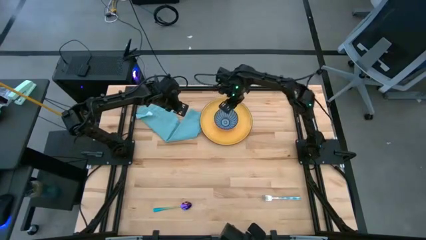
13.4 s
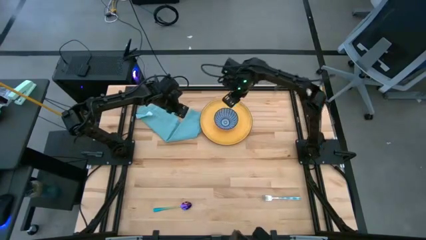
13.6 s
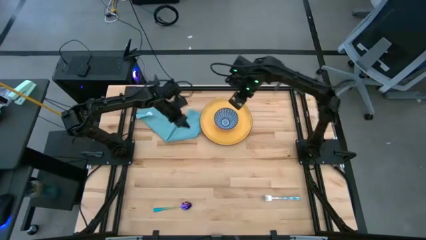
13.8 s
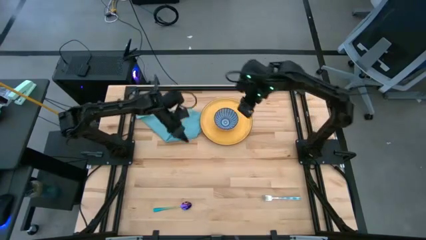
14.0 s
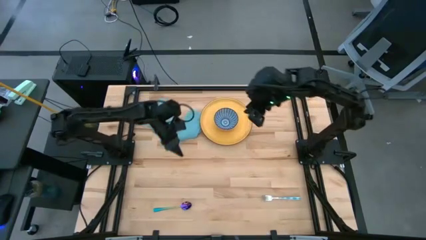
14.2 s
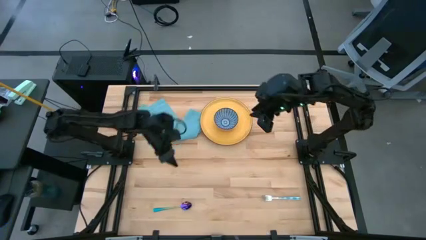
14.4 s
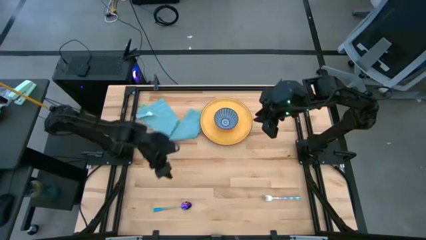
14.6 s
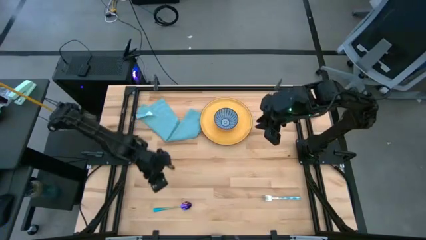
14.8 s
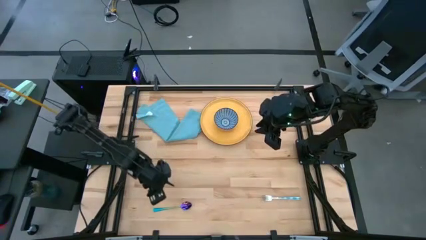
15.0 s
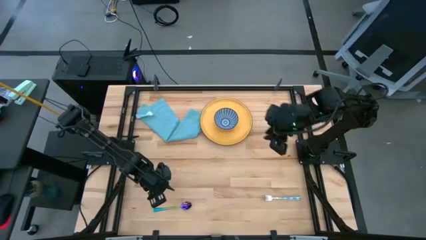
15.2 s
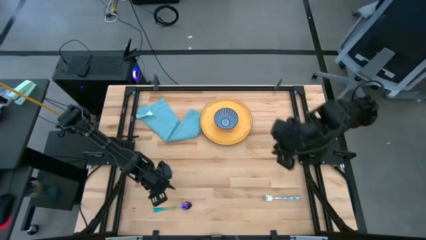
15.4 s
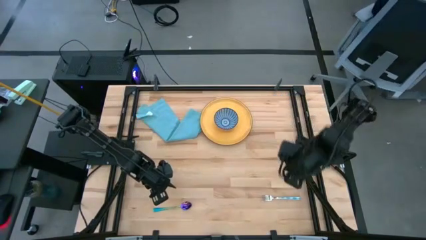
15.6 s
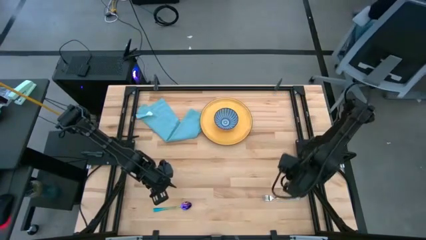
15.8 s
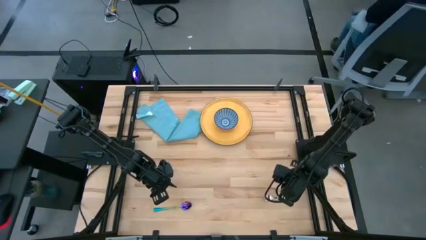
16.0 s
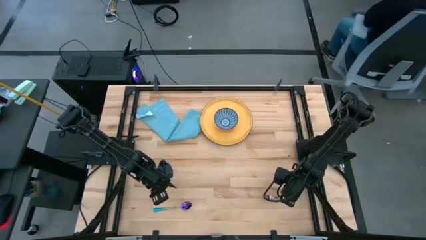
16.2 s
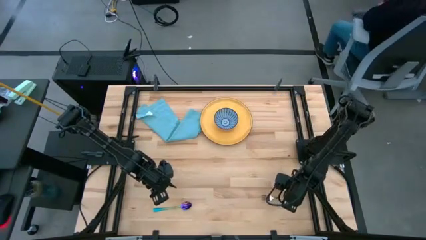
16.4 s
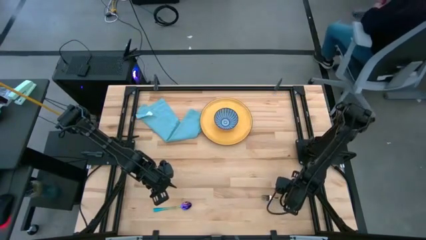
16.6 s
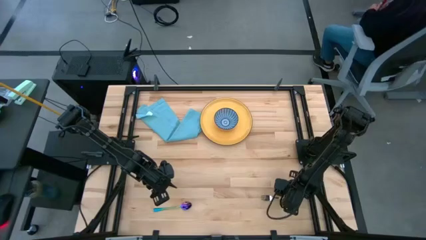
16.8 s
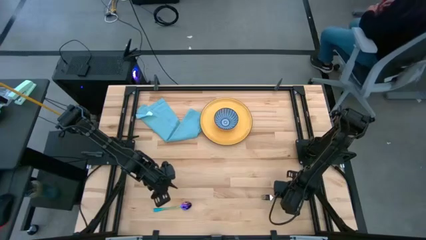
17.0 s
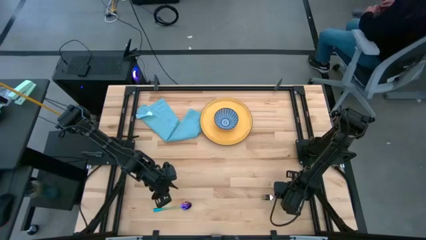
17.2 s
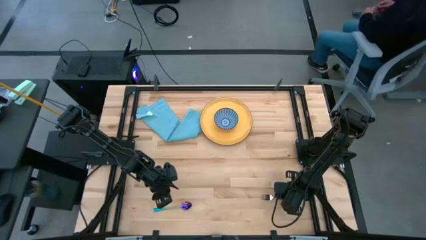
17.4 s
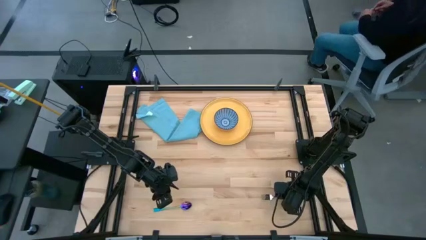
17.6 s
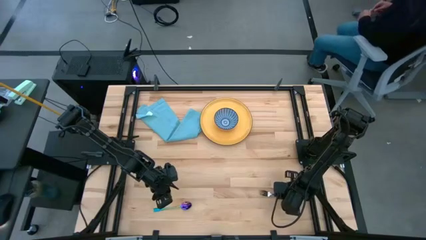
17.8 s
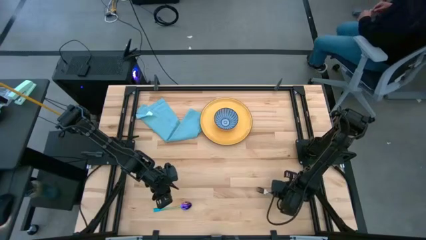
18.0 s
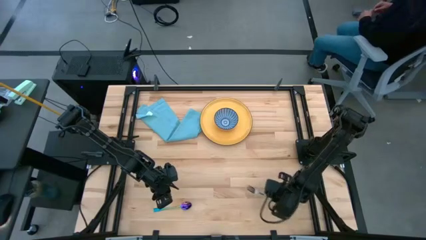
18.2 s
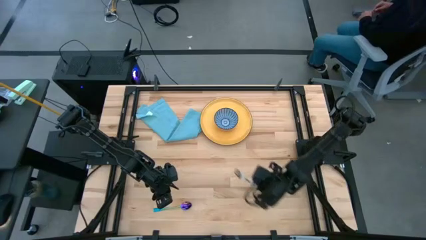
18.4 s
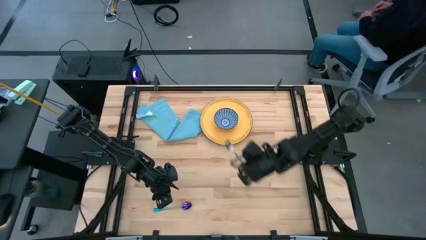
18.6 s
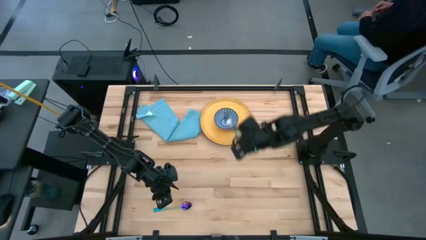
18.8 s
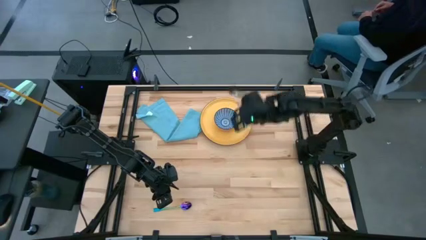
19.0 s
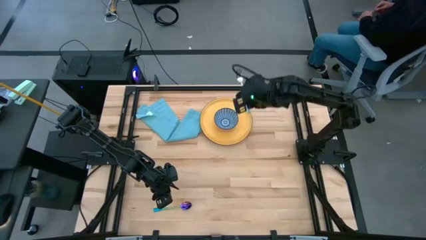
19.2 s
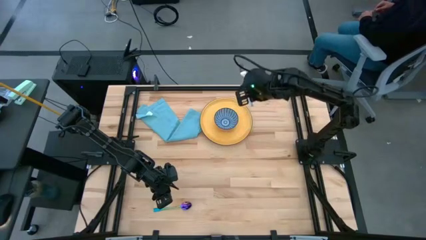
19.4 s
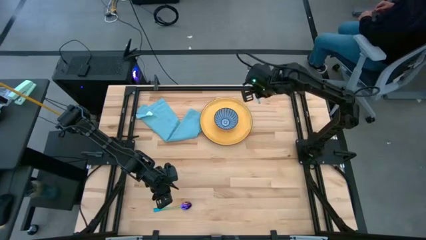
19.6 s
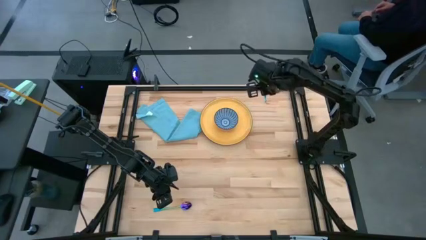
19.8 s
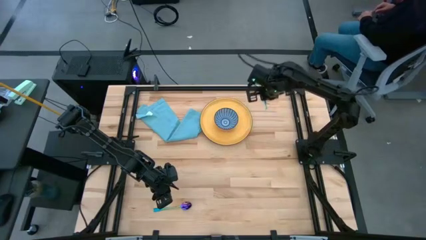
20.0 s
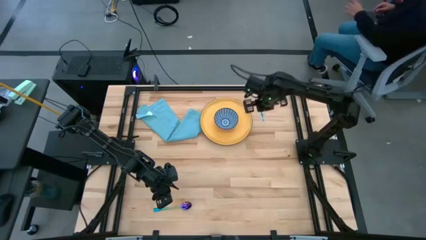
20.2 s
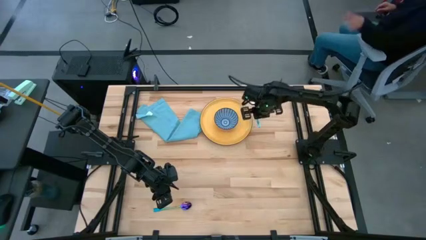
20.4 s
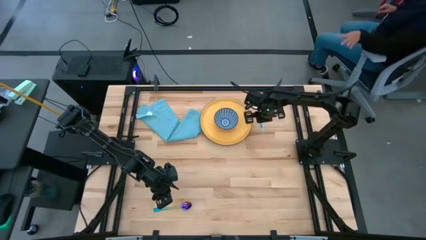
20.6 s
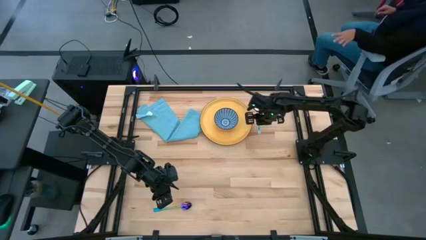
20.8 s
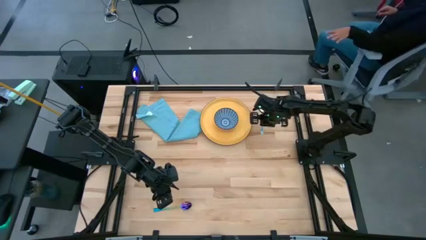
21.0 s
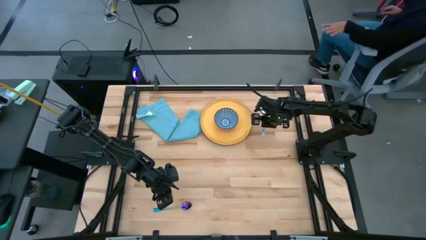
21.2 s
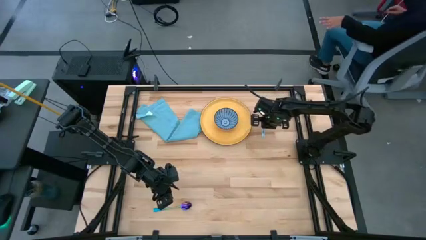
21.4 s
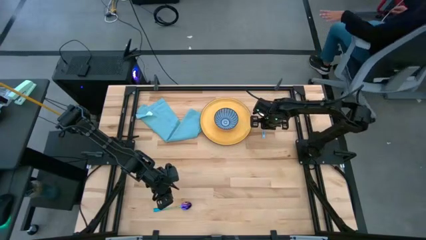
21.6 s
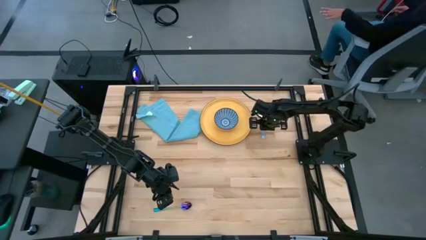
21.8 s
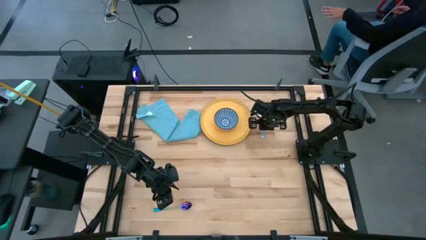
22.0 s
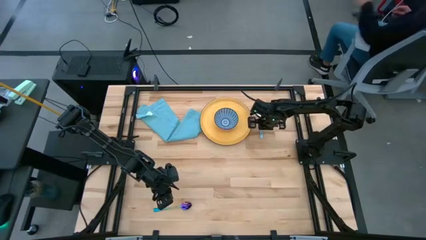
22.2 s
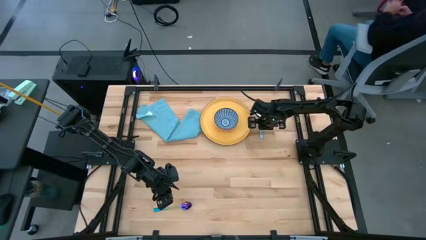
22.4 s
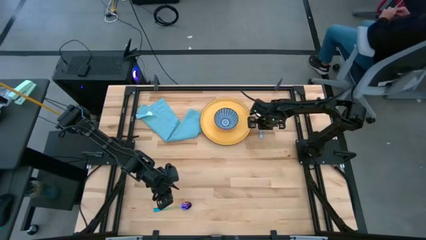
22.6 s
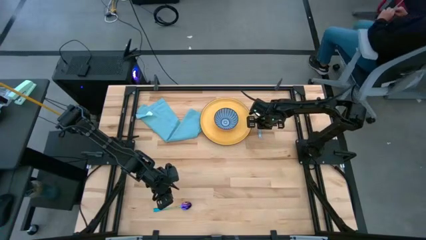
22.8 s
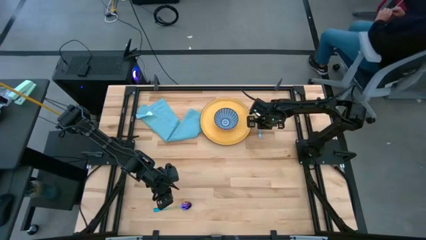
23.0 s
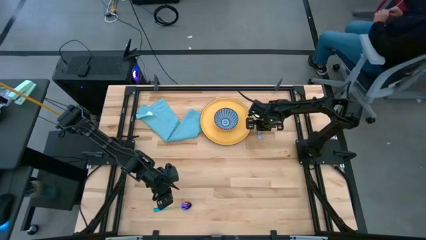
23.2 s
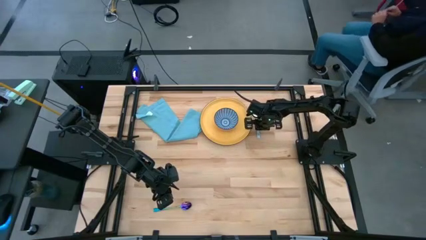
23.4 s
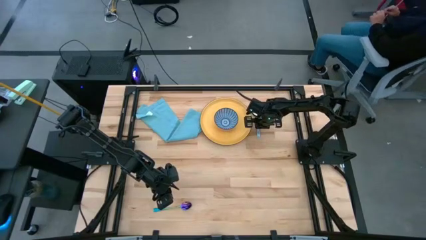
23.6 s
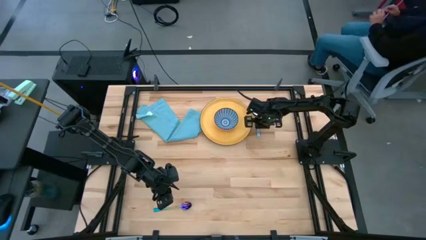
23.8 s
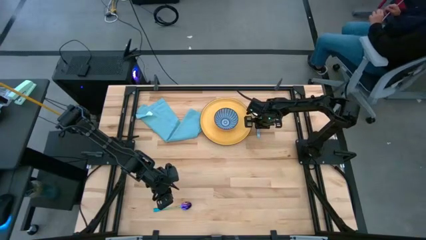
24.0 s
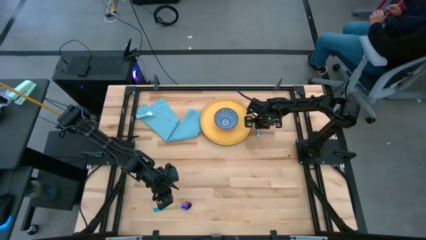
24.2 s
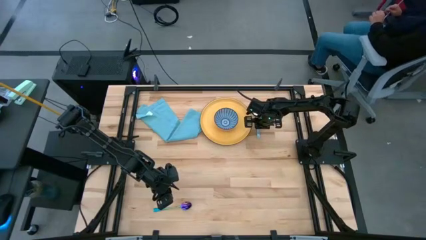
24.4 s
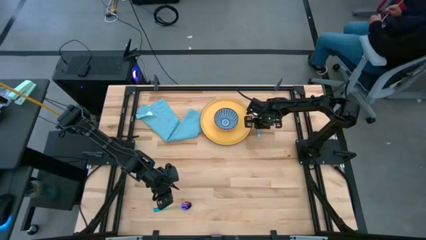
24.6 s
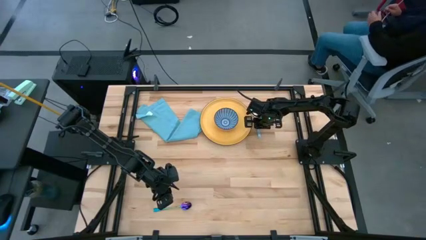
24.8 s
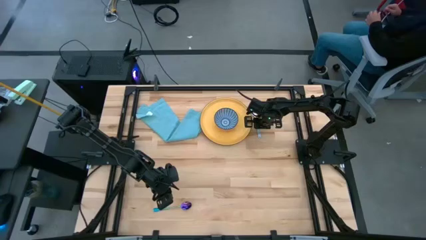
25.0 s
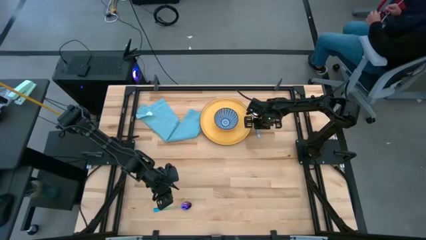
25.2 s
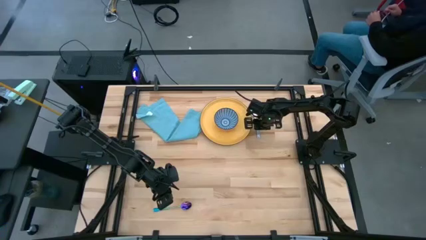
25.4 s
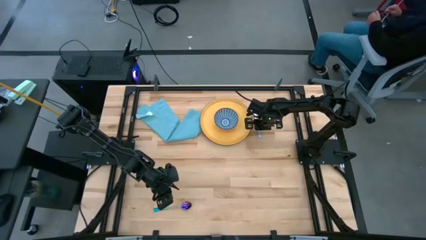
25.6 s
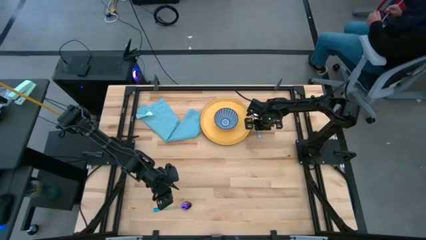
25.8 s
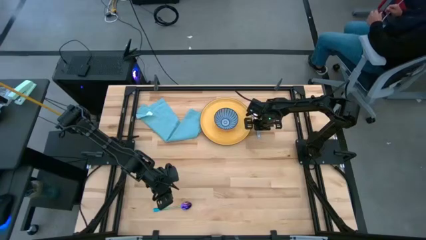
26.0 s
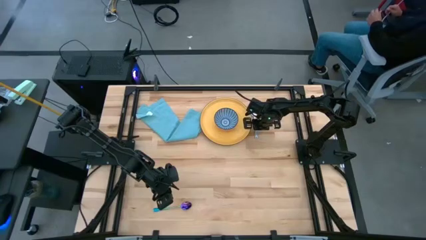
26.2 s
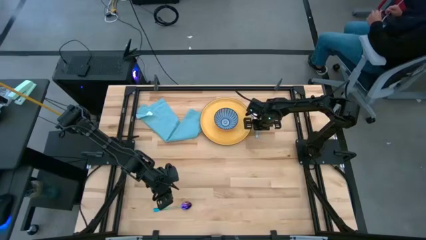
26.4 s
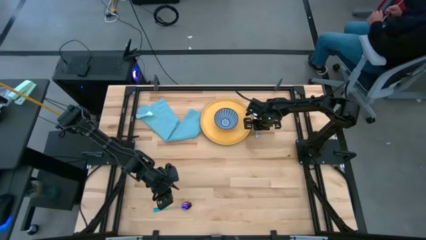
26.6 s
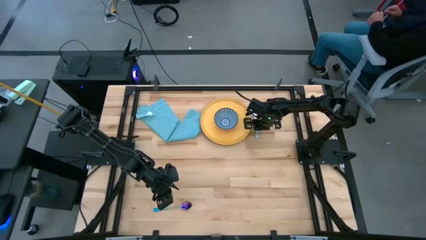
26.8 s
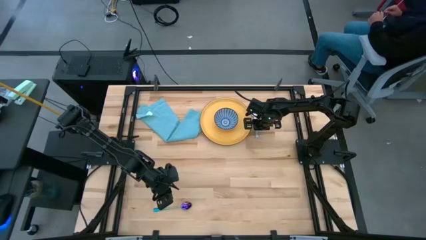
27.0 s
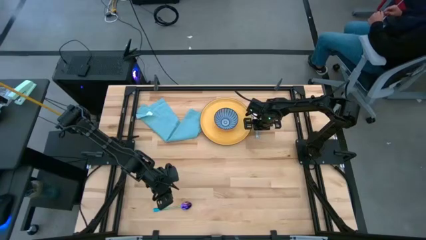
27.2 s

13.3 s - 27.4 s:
Task: Set table place
Put the white green fork to the right of the yellow plate
